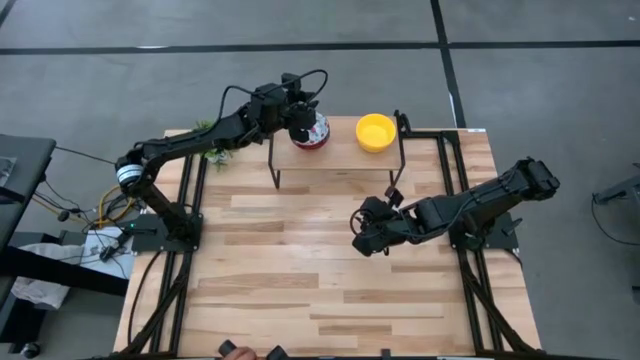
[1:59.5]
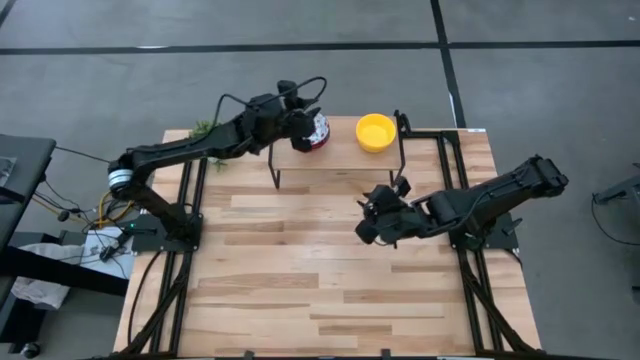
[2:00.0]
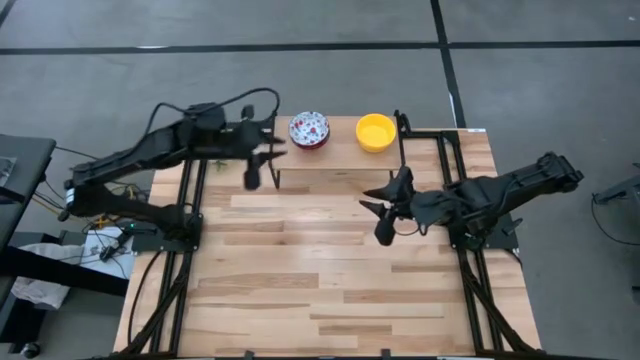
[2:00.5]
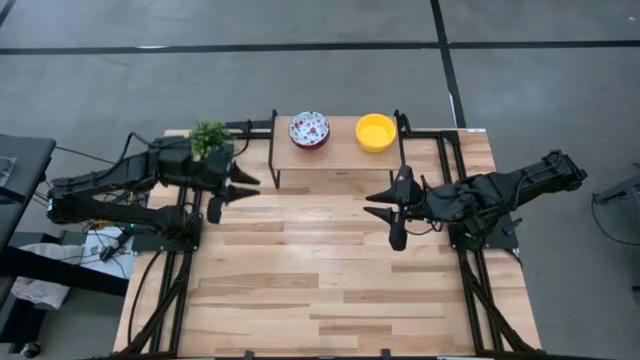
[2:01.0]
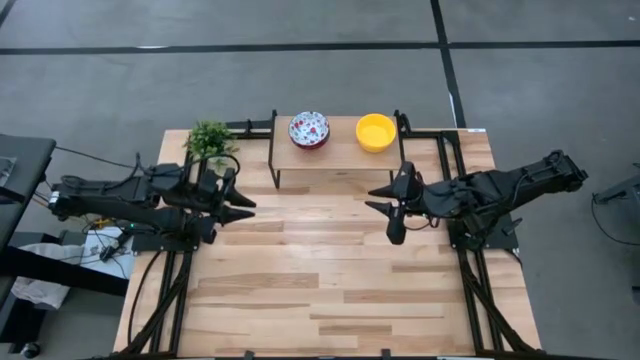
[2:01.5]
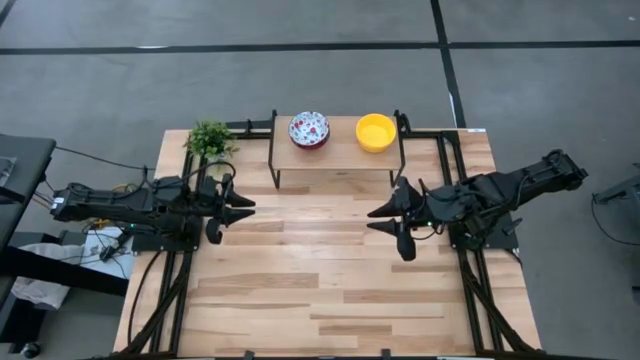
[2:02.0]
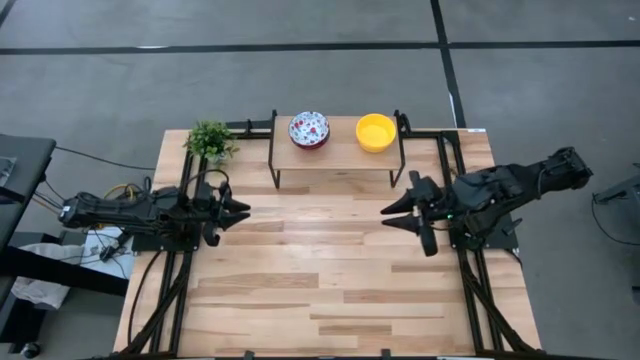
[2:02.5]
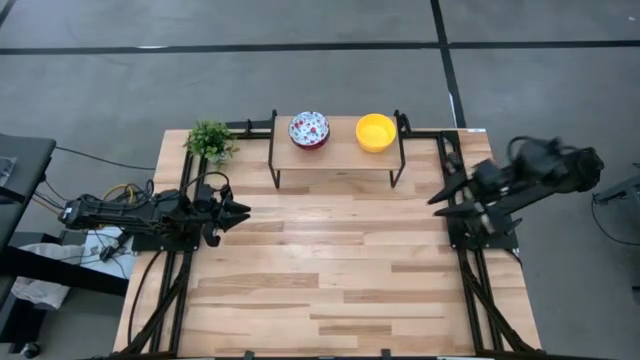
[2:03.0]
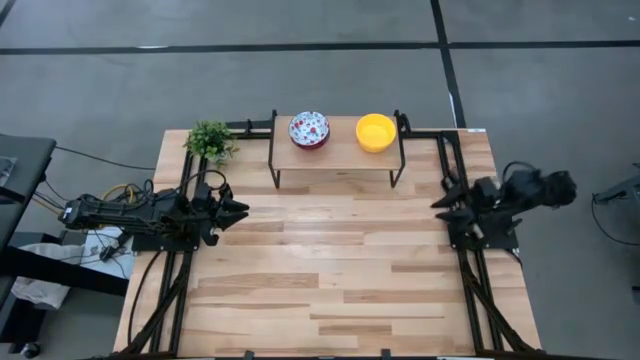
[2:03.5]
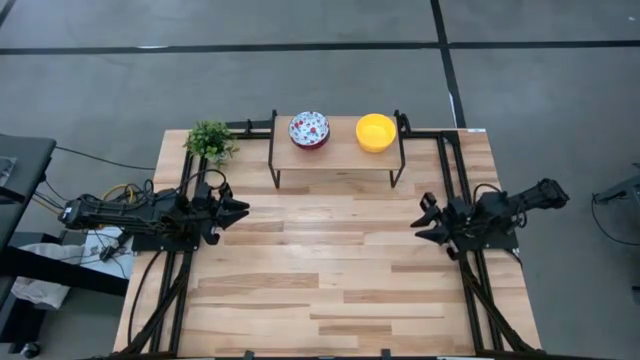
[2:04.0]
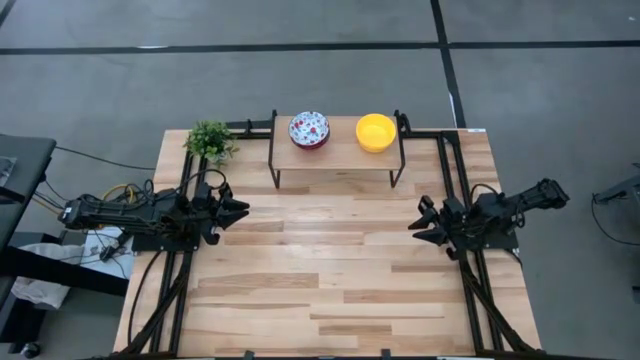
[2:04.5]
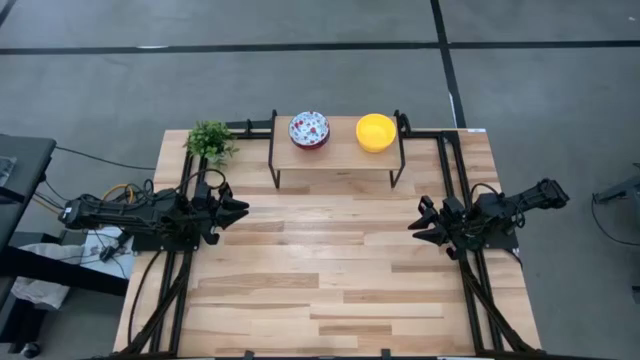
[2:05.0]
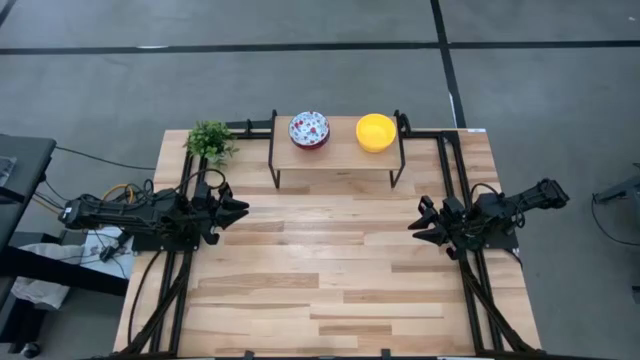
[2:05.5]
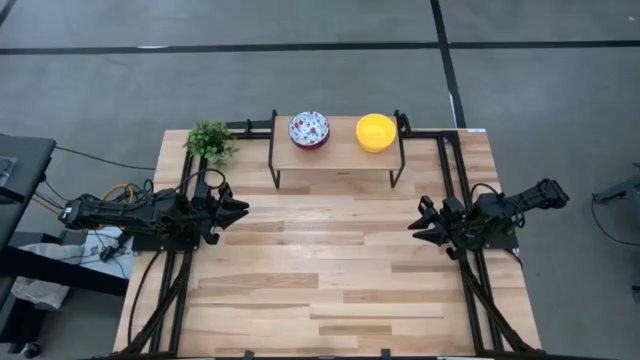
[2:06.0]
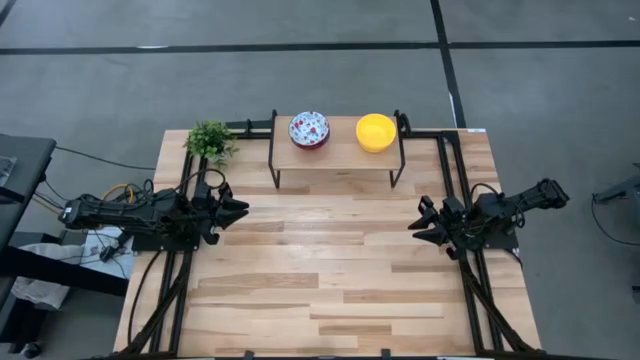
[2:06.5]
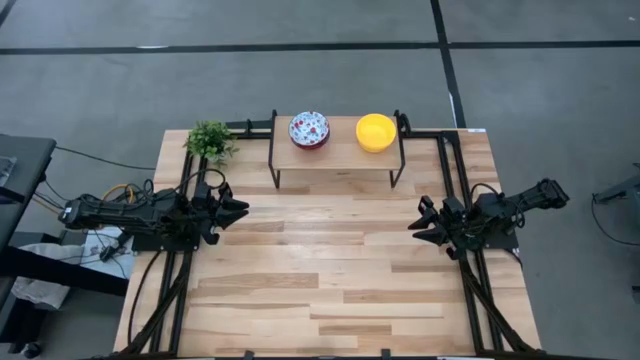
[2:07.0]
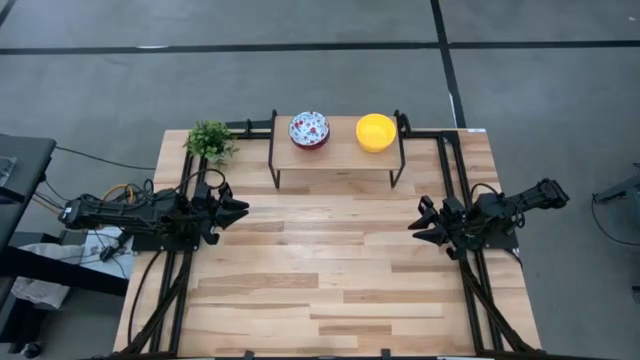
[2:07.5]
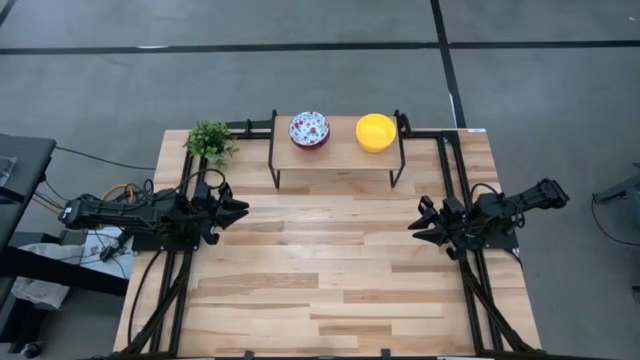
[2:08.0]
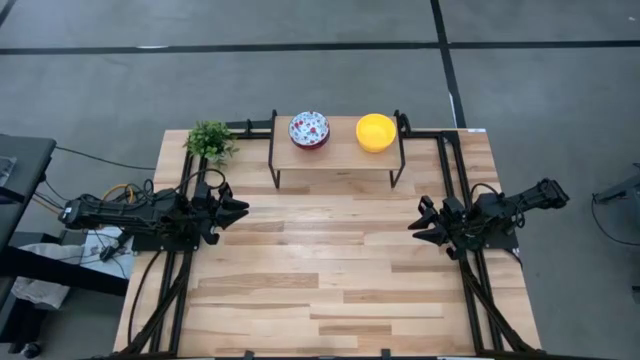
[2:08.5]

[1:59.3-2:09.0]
Task: Pick & Place Mini bowls
Return to Home Position

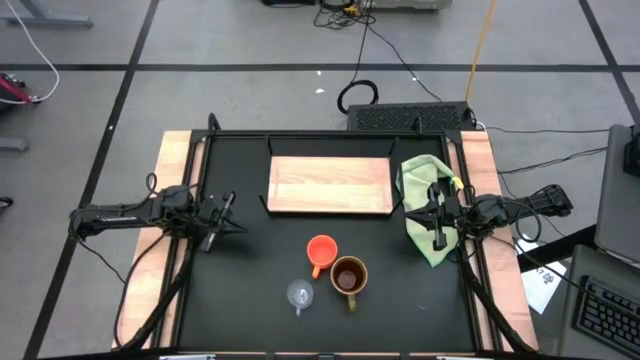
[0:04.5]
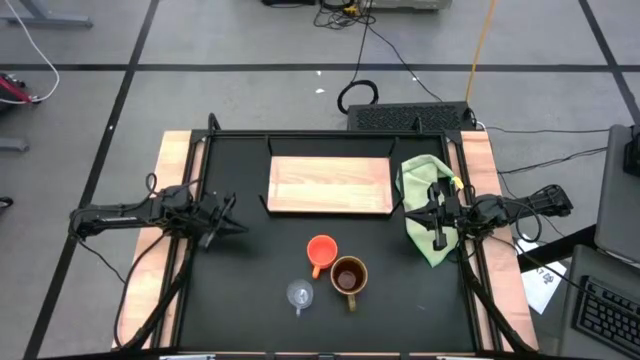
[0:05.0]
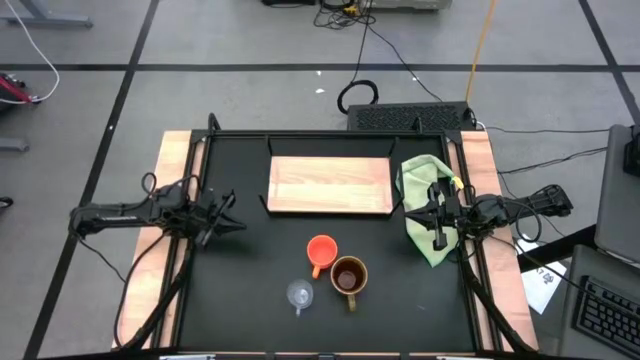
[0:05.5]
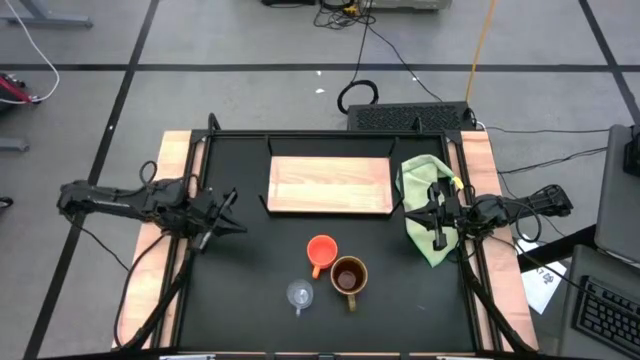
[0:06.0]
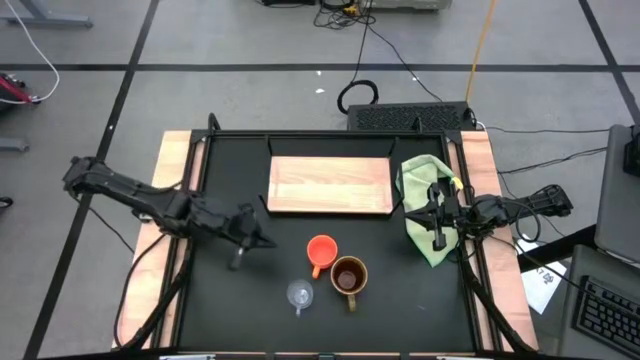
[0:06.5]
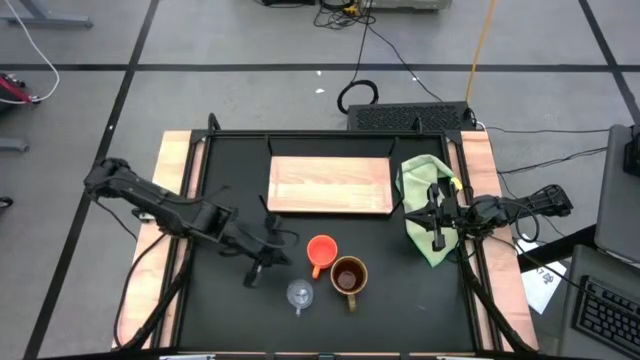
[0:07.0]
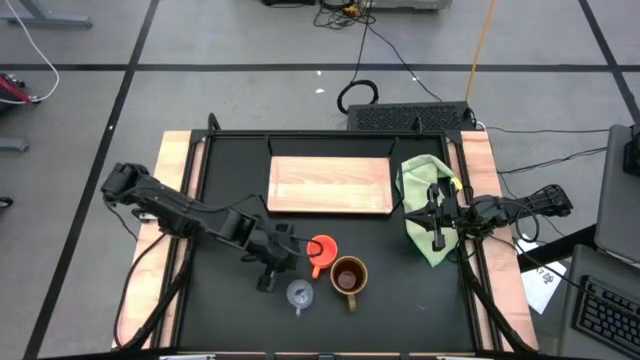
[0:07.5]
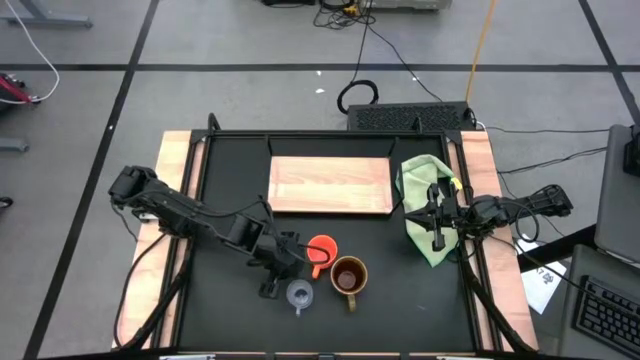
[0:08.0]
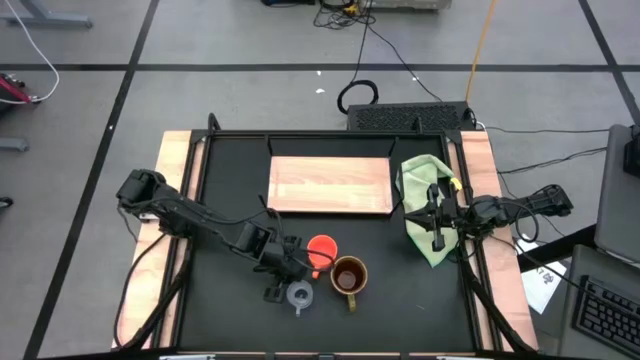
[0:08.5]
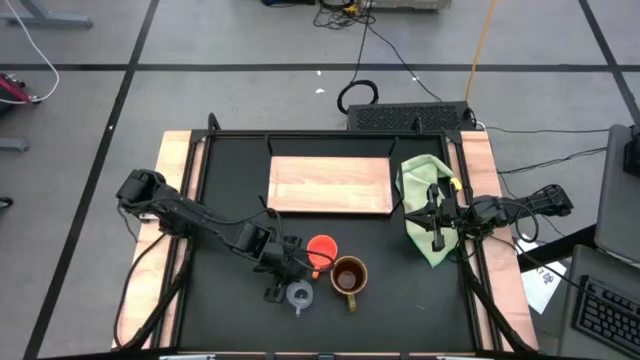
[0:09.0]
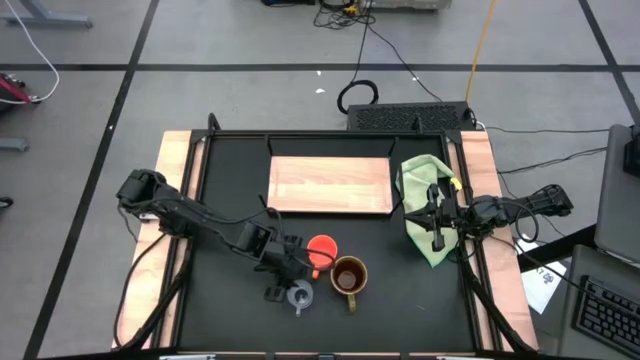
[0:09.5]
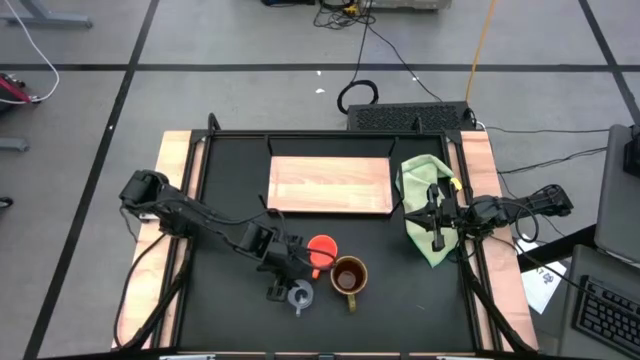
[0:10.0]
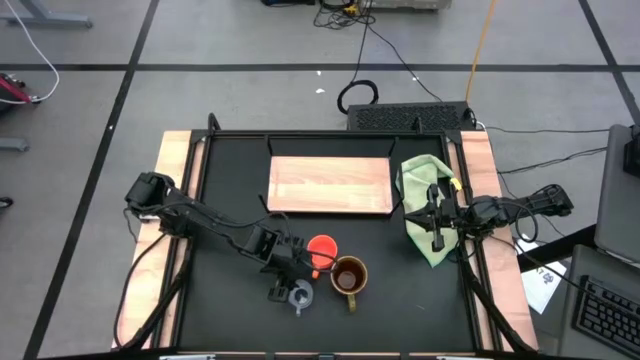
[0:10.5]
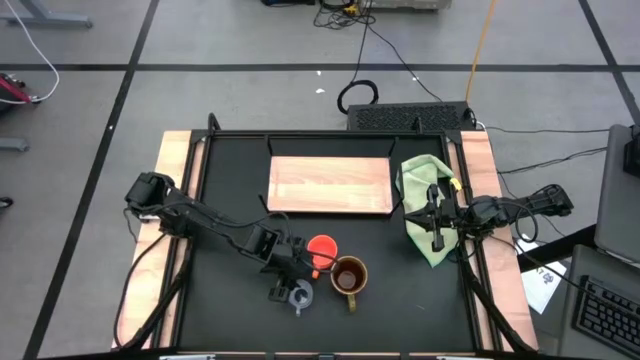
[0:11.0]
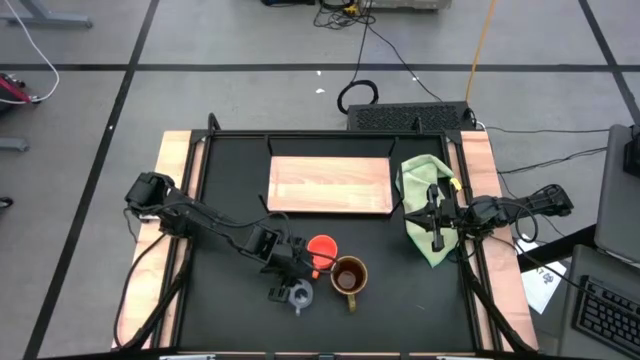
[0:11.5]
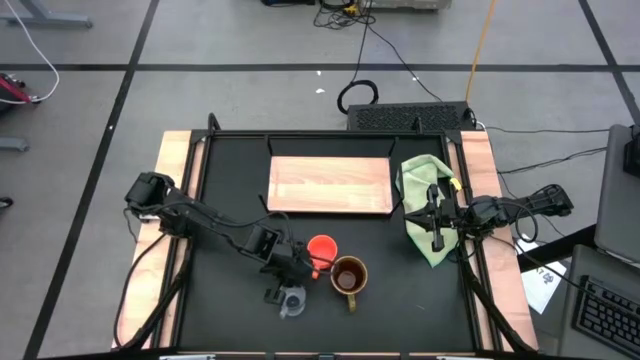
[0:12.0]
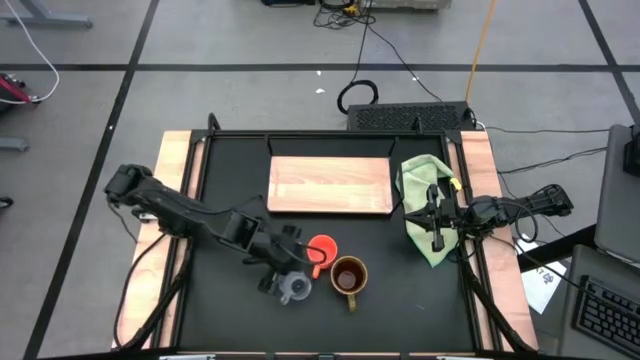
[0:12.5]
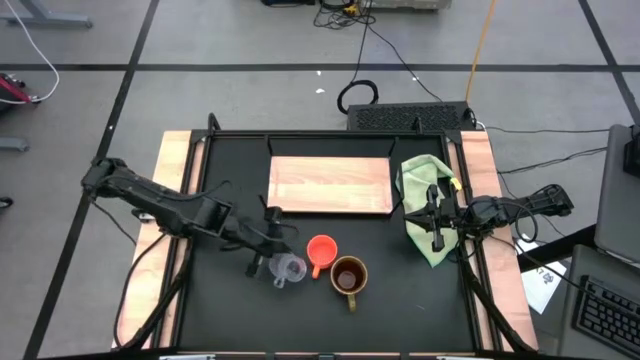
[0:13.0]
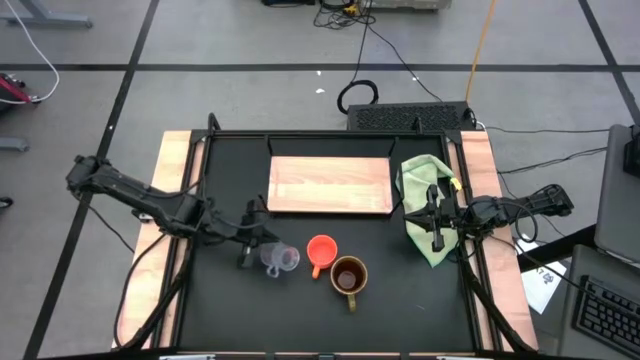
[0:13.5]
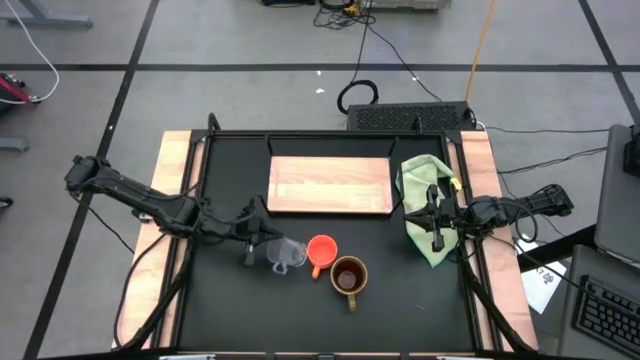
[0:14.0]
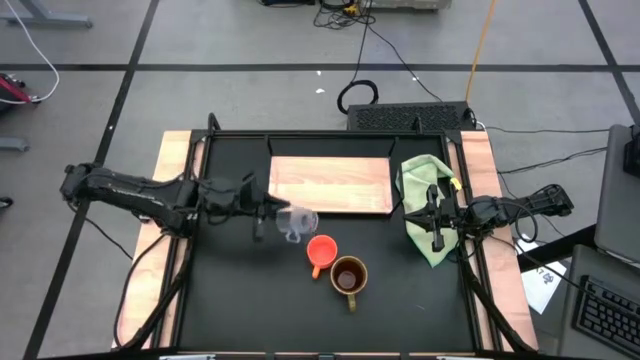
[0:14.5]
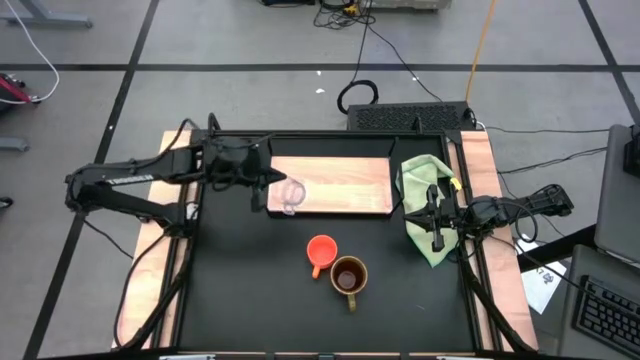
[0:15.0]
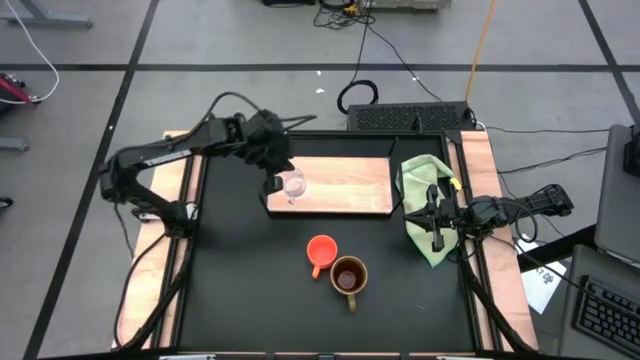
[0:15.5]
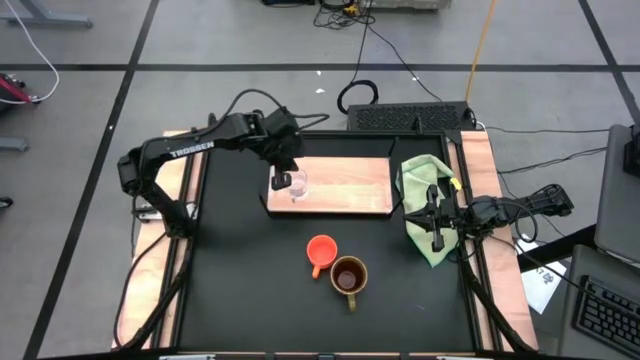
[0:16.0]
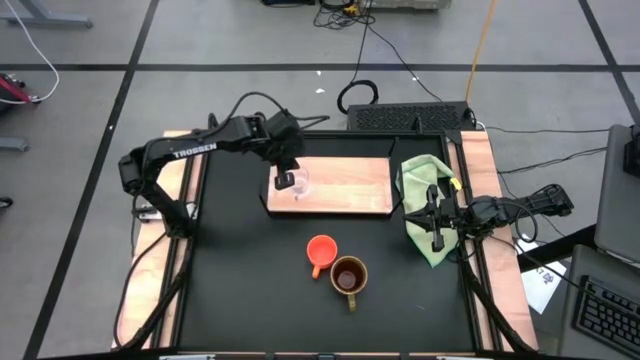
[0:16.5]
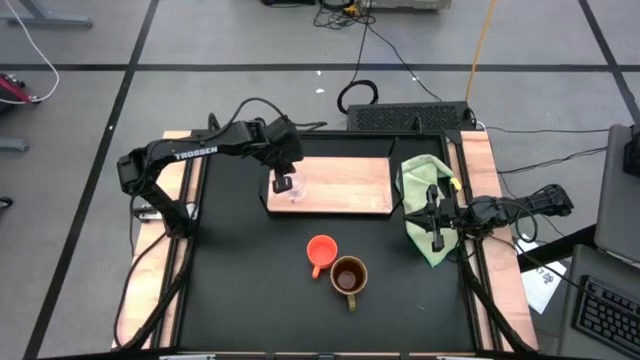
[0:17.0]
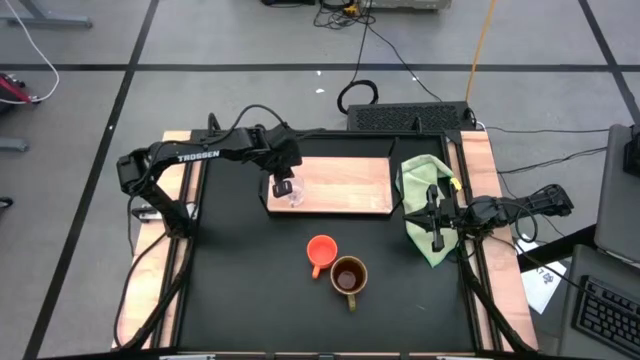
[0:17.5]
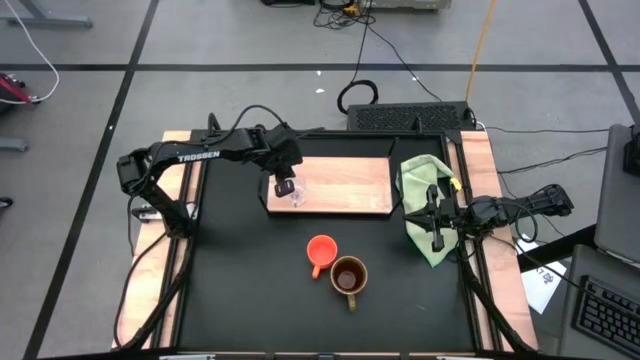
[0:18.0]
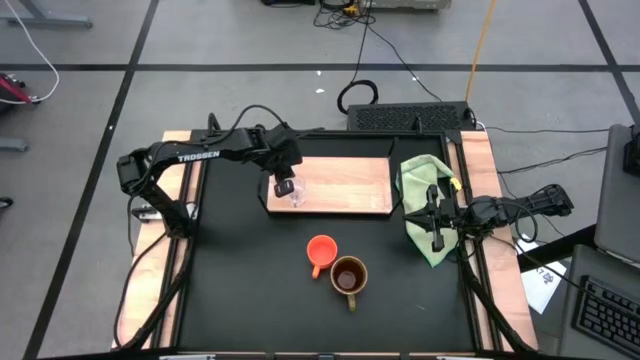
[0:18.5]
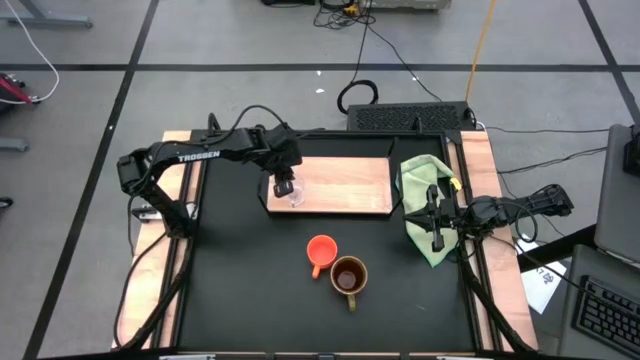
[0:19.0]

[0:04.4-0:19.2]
Task: Stack small to large cups/mugs on shelf
Put the transparent mug on the shelf
